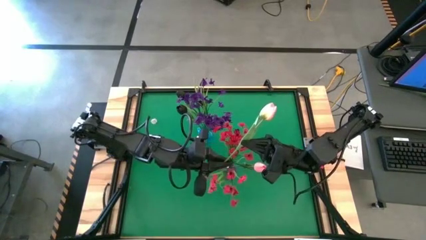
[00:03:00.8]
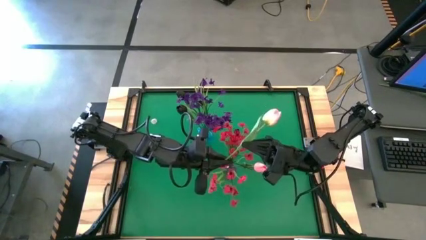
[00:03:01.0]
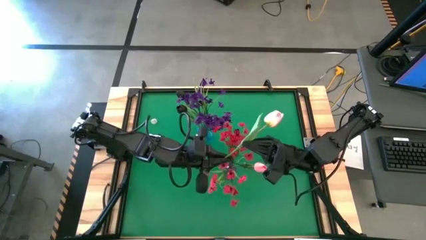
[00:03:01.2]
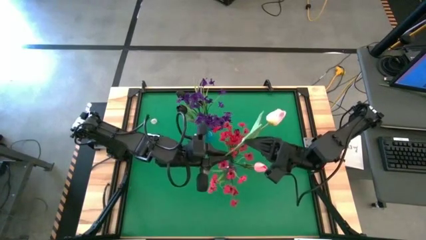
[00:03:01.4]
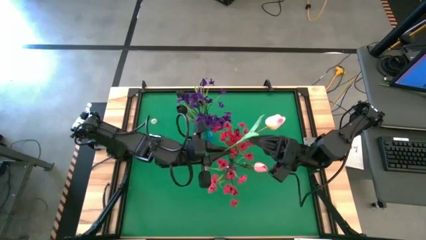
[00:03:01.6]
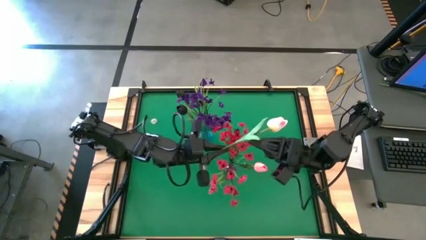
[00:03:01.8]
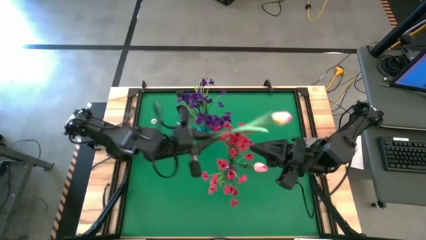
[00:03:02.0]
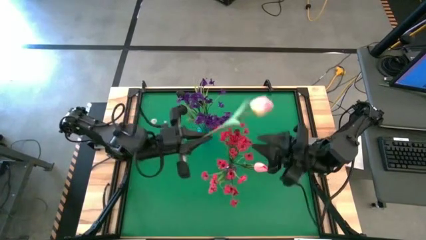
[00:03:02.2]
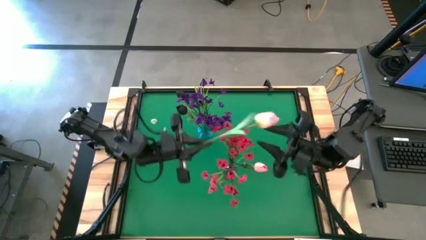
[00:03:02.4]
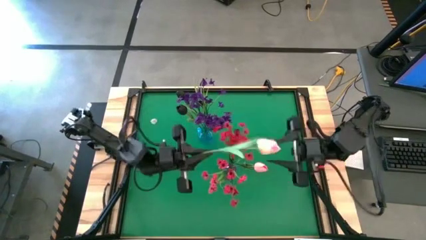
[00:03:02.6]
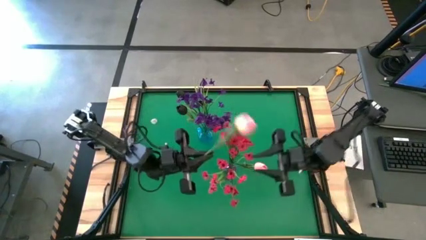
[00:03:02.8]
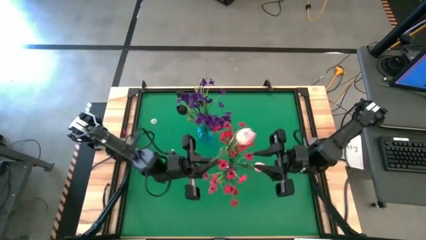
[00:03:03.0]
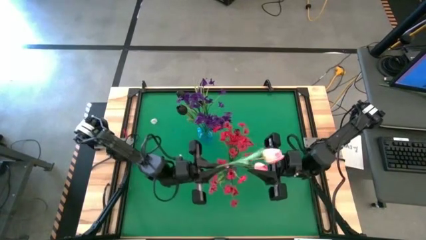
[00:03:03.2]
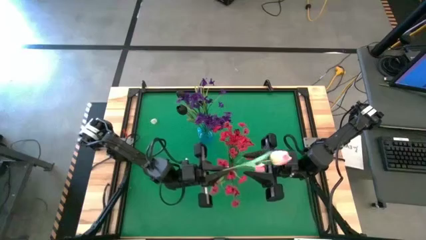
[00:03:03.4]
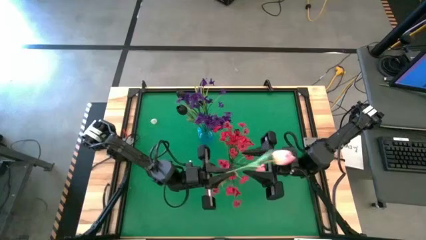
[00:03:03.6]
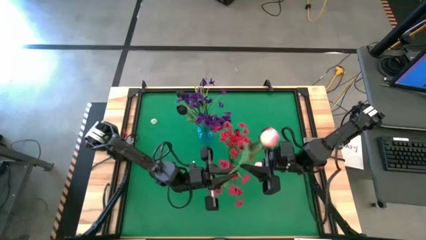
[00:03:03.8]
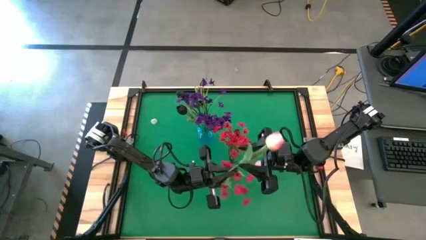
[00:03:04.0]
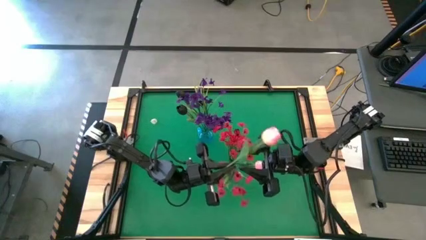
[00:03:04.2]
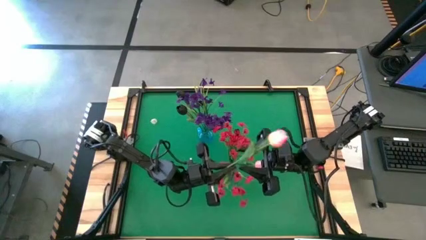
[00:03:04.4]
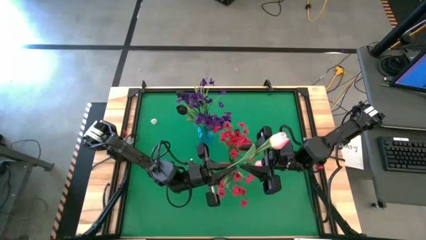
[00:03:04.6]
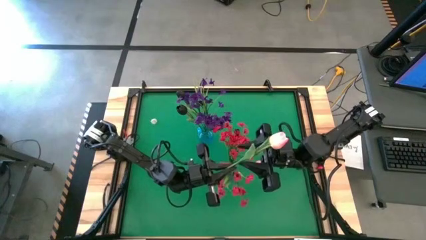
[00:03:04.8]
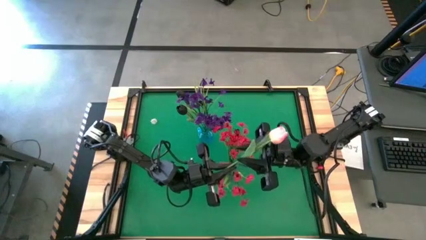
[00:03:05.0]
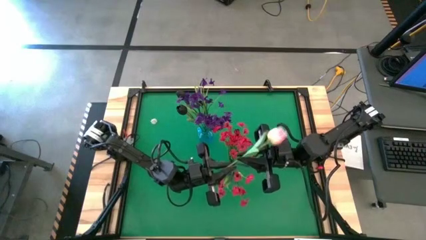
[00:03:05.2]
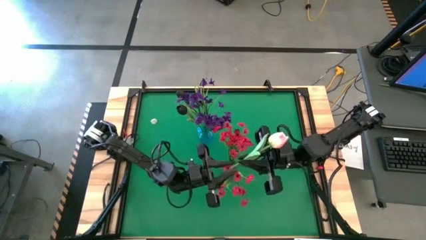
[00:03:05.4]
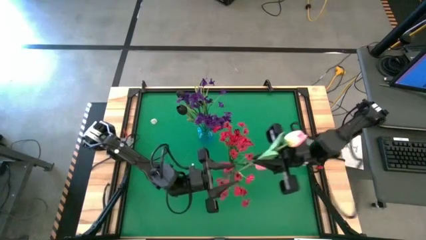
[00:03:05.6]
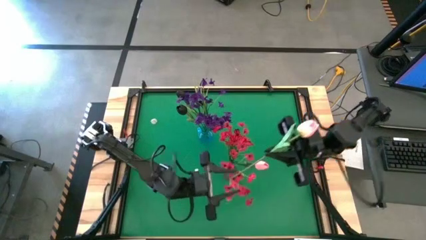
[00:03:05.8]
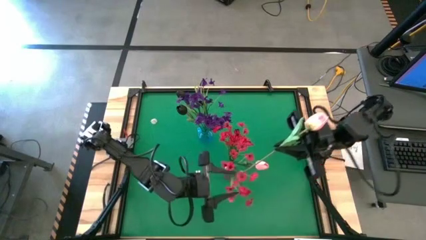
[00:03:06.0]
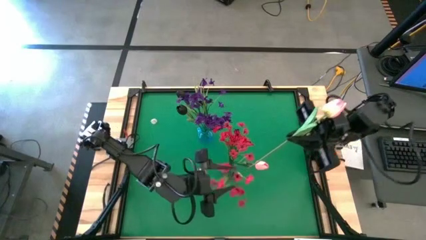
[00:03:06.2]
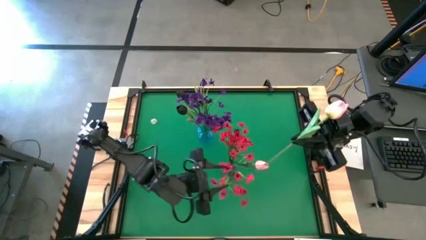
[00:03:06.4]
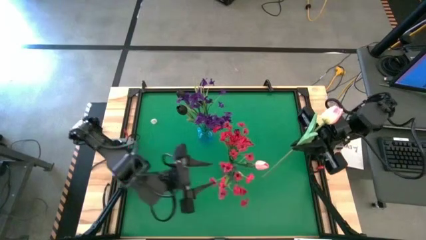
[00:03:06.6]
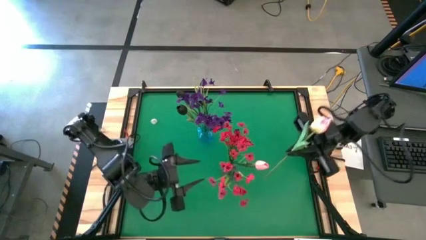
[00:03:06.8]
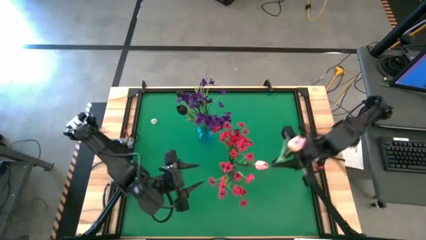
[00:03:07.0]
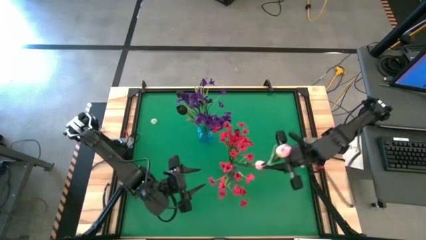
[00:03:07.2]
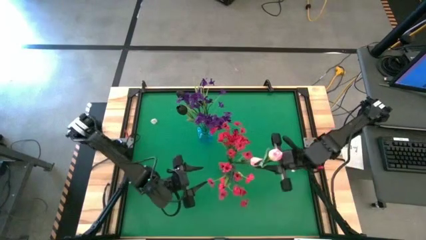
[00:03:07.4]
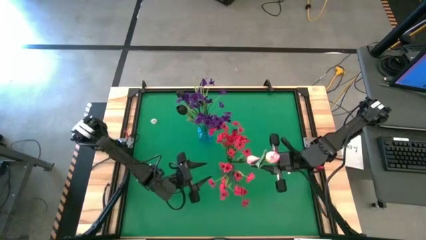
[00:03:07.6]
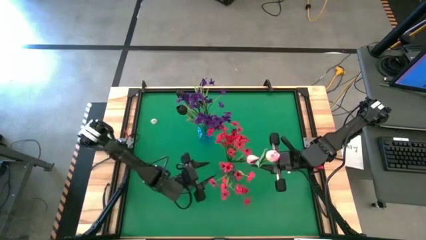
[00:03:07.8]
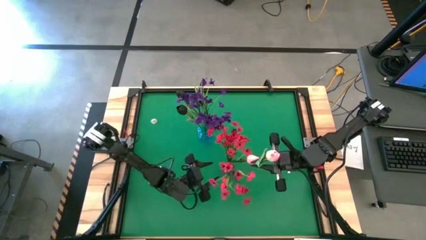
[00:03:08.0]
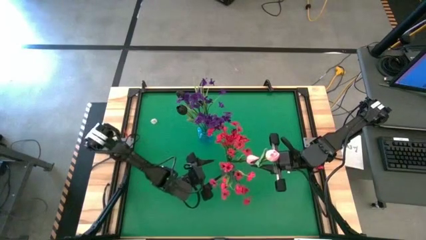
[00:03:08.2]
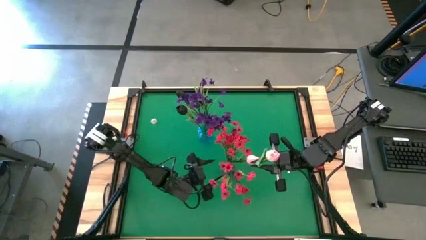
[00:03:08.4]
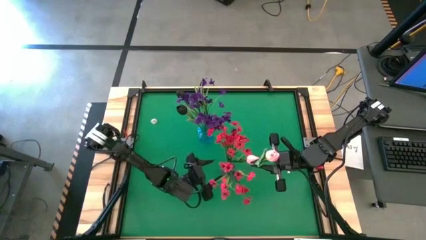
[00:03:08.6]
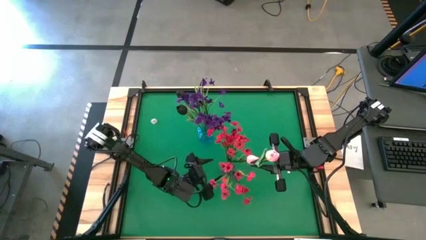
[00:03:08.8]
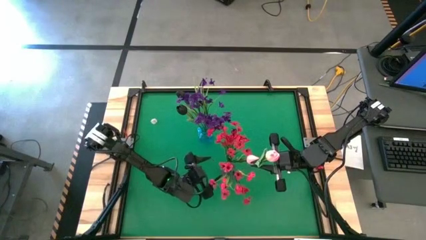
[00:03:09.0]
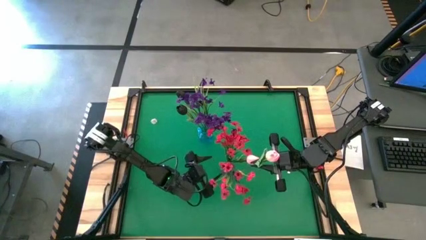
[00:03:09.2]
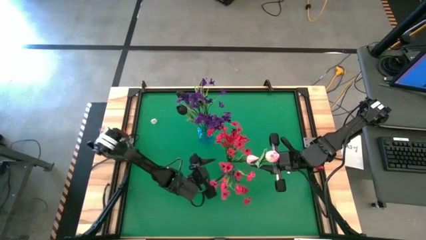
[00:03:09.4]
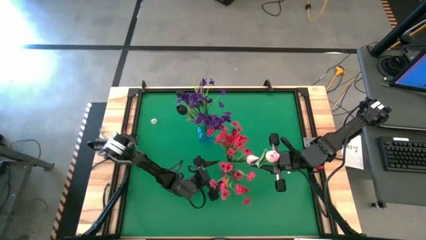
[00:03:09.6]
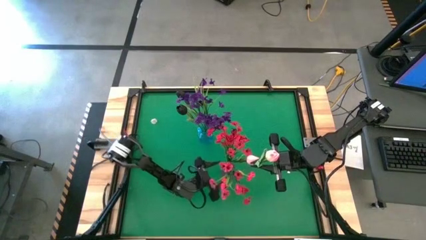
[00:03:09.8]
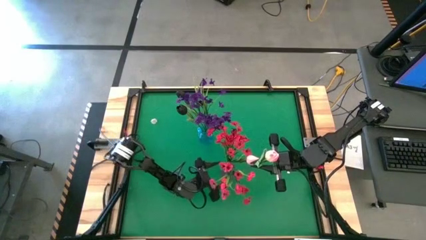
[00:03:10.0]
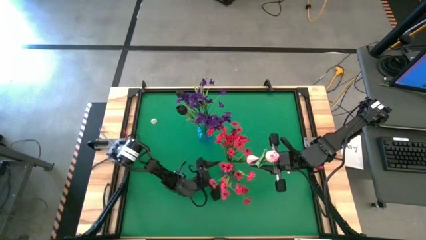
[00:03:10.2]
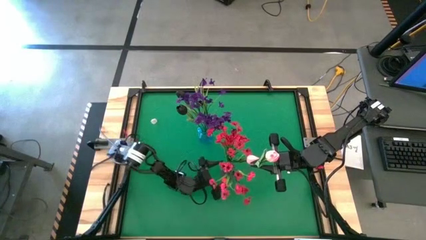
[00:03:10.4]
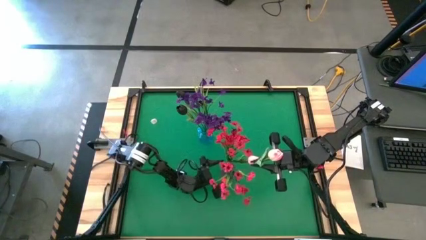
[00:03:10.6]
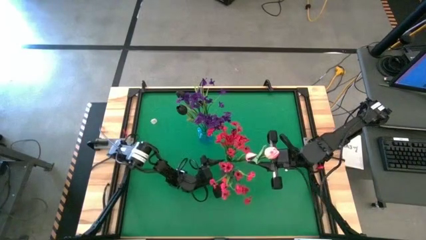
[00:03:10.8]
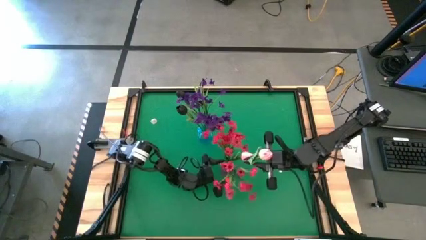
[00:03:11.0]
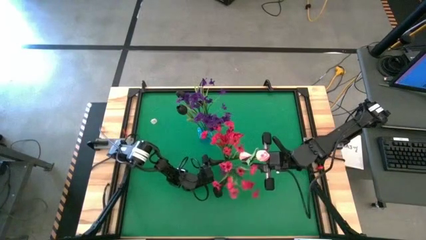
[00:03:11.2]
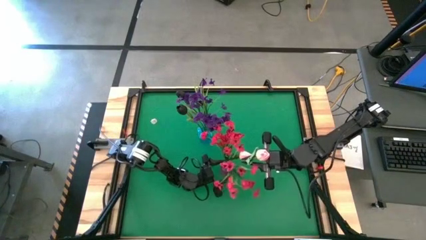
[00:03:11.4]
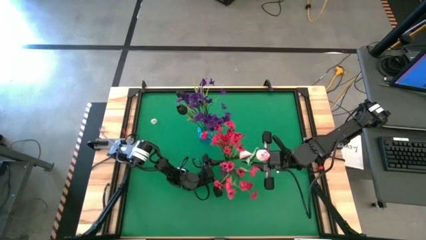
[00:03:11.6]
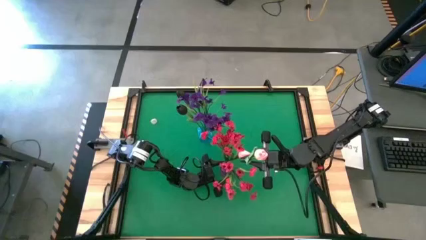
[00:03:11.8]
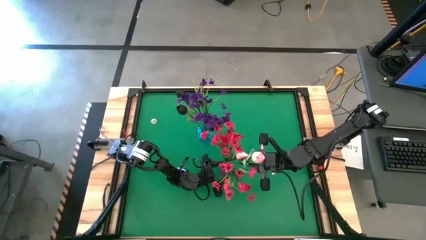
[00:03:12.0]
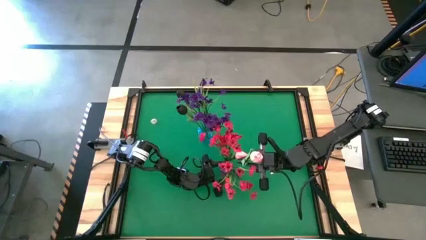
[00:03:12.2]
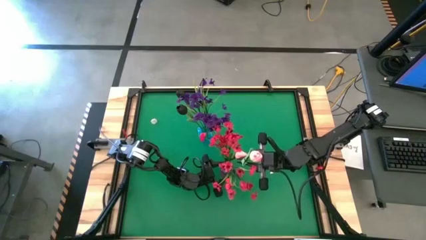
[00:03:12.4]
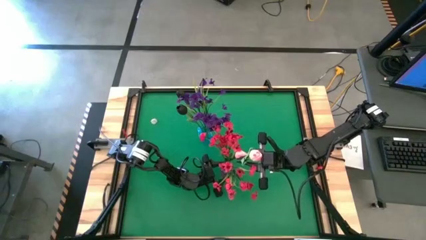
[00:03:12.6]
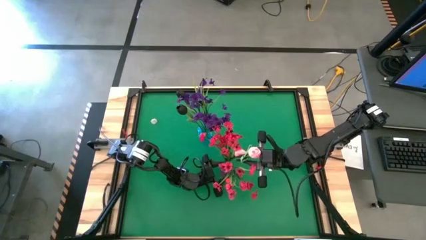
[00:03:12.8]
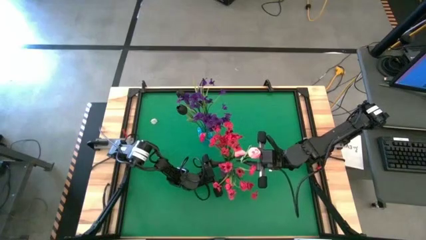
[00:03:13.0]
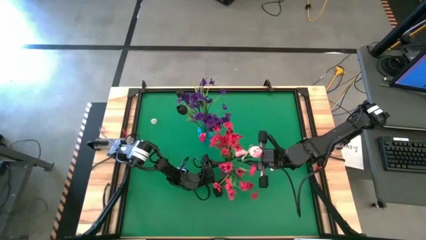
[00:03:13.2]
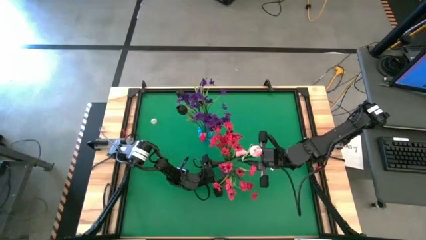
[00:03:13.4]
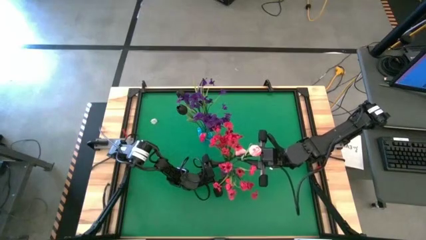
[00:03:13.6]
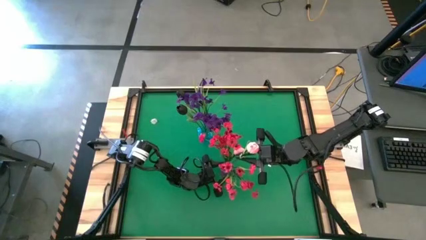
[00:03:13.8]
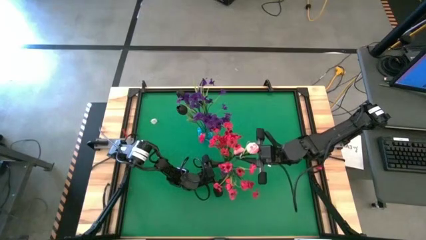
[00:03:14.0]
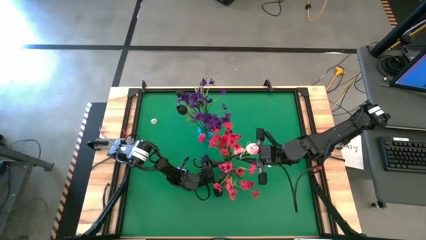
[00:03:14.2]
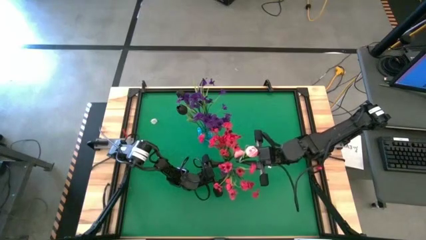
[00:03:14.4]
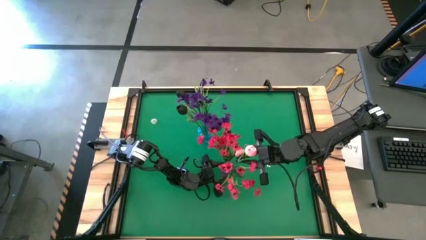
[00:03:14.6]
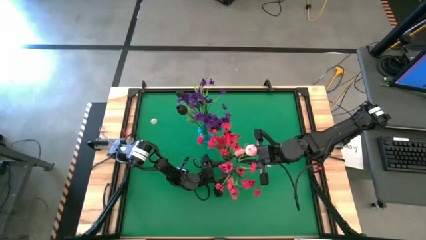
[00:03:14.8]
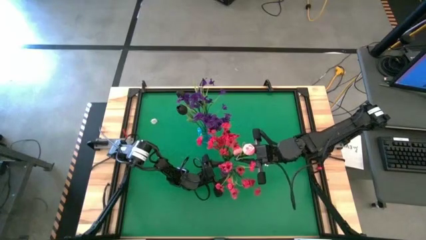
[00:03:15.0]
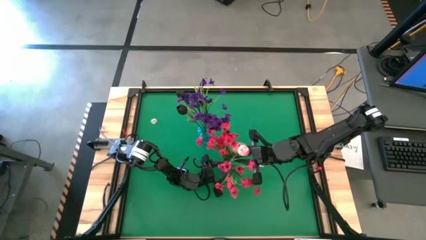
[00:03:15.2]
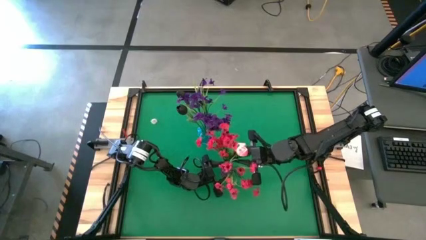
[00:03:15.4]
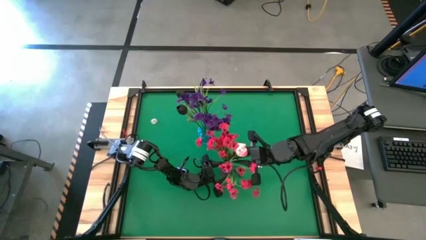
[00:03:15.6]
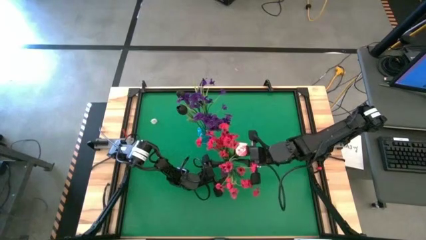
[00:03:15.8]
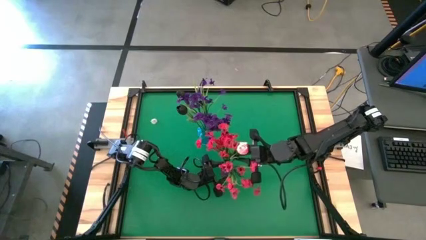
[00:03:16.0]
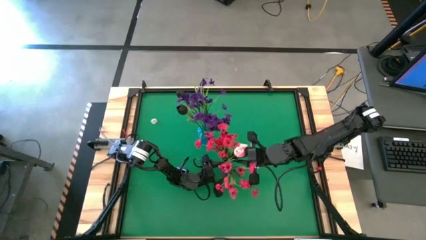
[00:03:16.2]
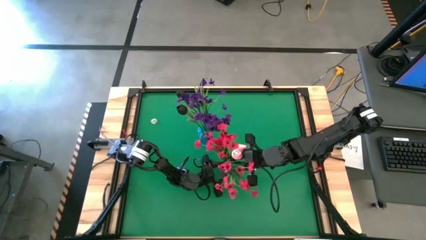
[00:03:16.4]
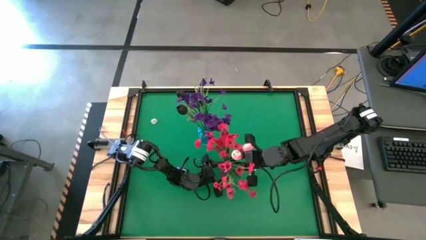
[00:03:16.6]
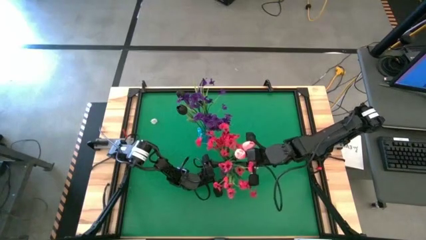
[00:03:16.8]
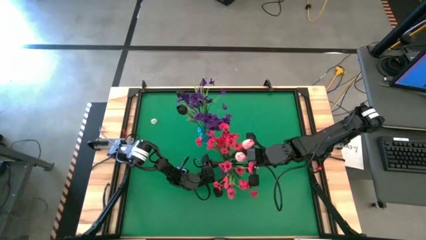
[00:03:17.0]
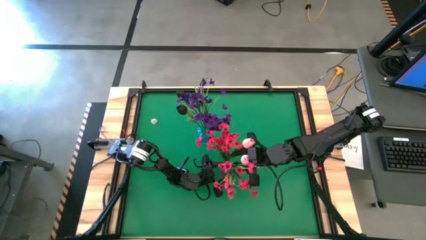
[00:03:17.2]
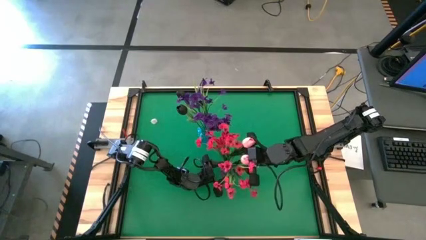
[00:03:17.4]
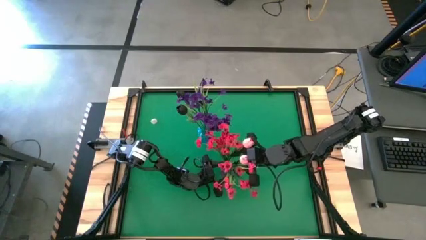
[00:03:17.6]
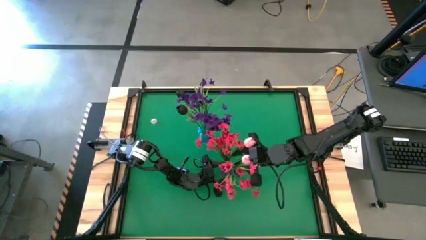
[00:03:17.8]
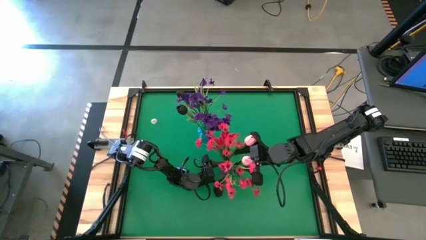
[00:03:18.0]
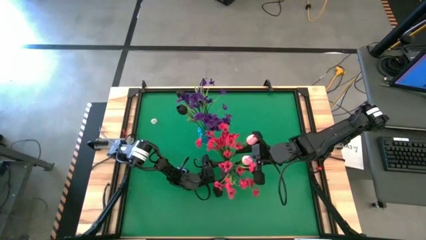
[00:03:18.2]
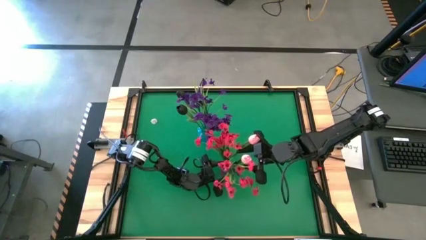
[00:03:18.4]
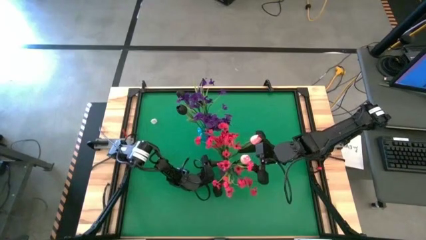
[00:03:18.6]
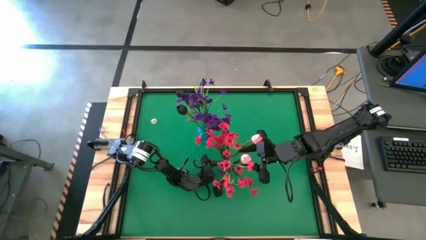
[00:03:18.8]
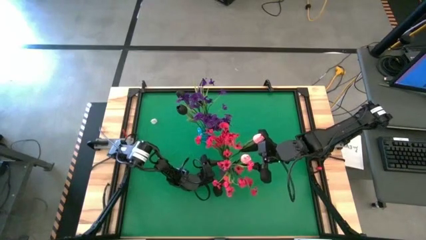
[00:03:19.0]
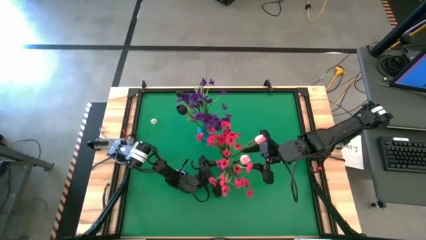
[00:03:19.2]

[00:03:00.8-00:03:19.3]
Task: Sort flowers into vase by color
Put the pink tulip into the purple vase
